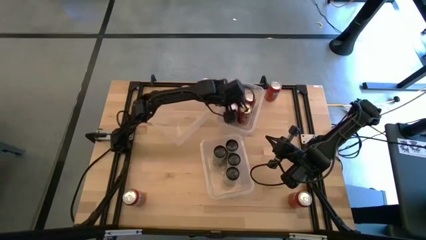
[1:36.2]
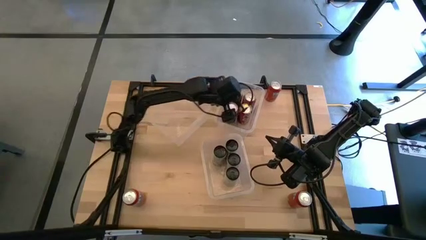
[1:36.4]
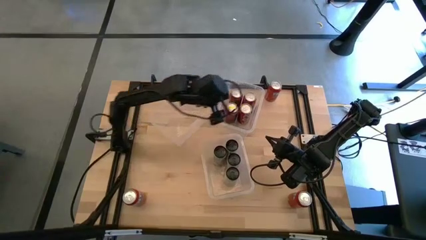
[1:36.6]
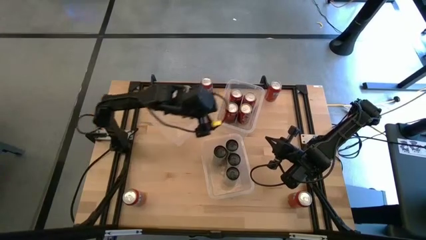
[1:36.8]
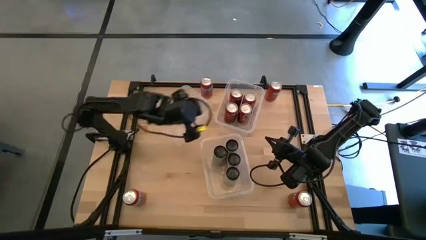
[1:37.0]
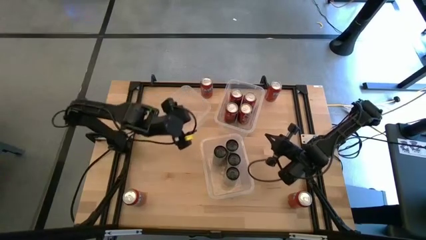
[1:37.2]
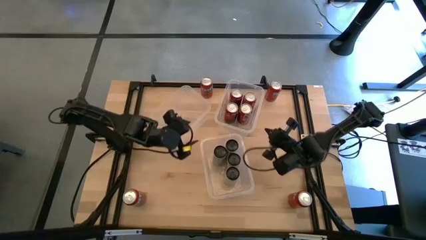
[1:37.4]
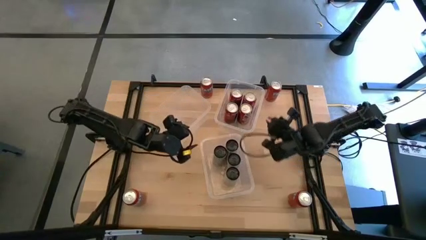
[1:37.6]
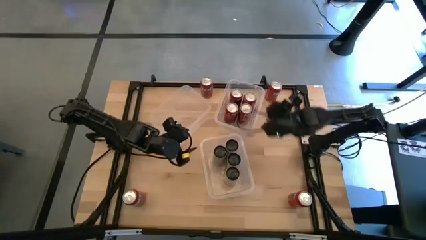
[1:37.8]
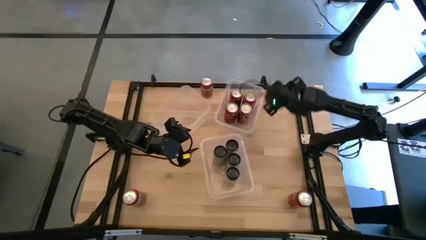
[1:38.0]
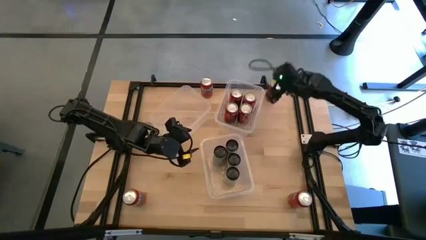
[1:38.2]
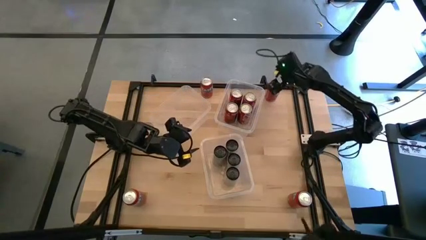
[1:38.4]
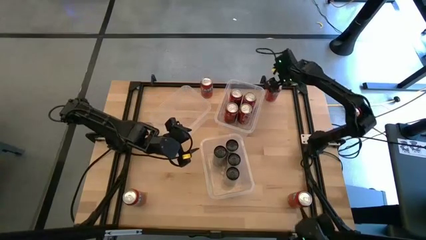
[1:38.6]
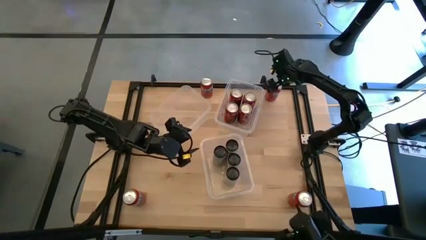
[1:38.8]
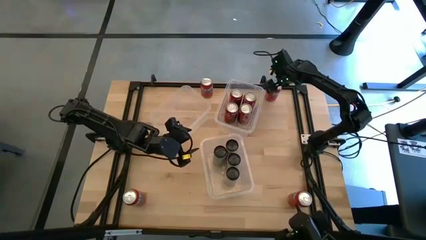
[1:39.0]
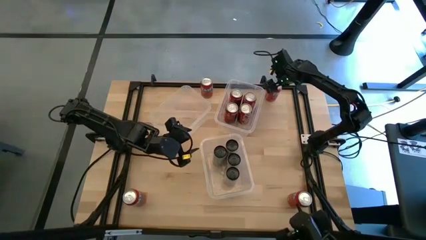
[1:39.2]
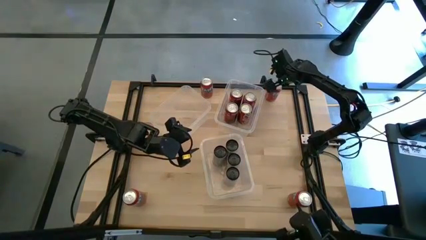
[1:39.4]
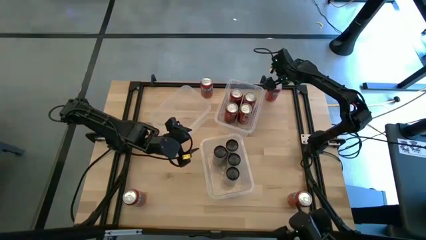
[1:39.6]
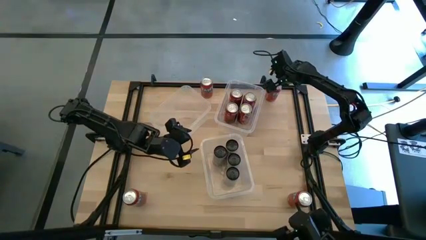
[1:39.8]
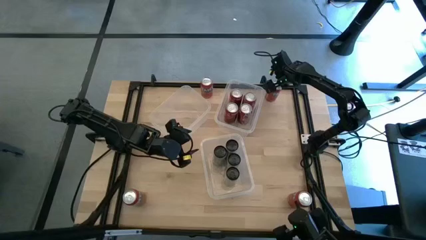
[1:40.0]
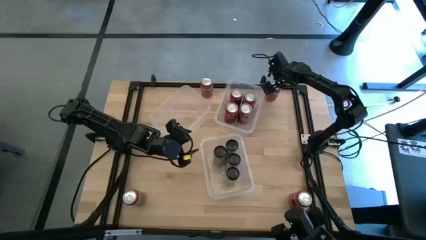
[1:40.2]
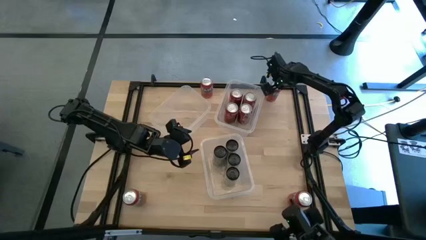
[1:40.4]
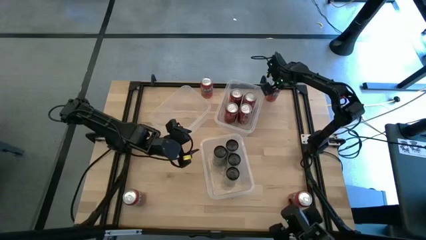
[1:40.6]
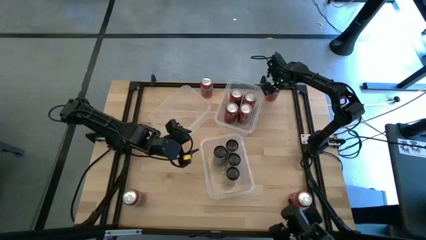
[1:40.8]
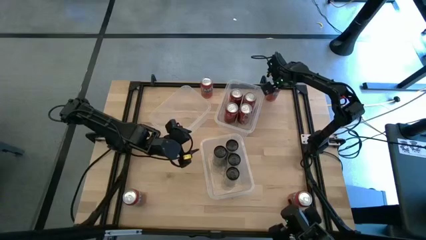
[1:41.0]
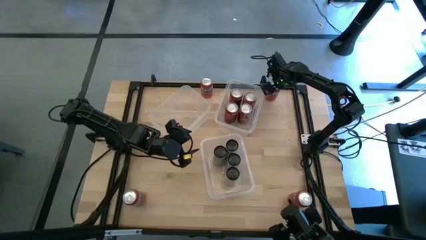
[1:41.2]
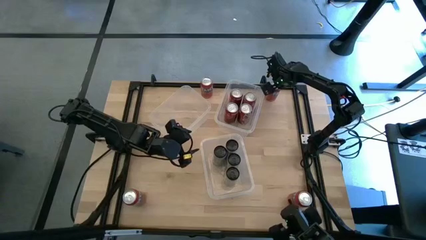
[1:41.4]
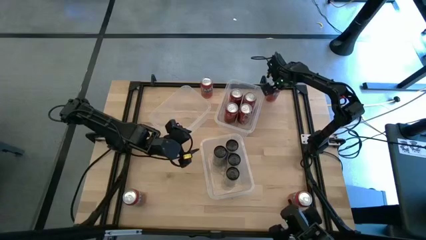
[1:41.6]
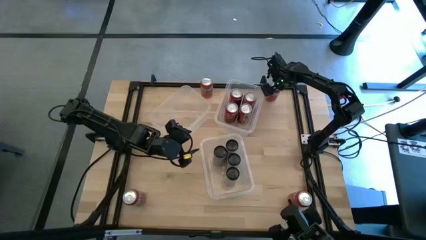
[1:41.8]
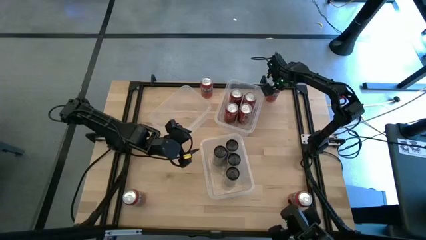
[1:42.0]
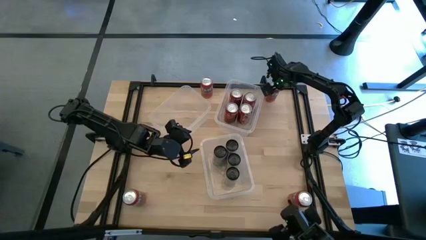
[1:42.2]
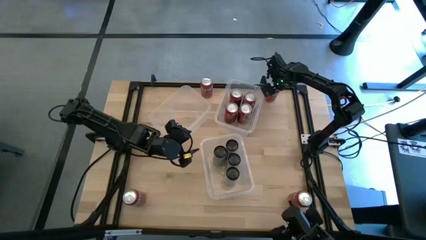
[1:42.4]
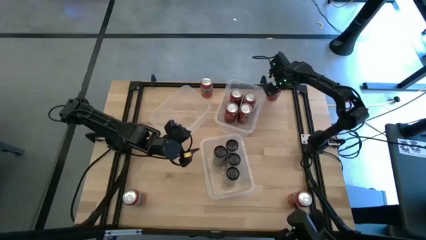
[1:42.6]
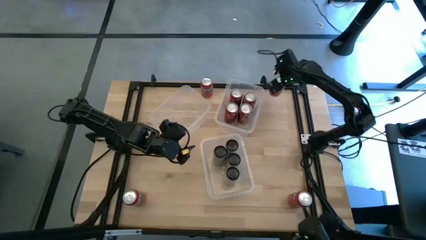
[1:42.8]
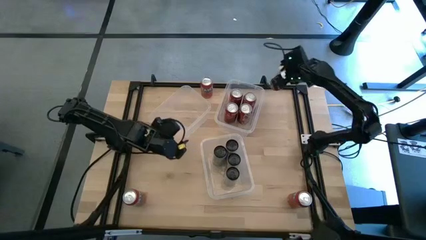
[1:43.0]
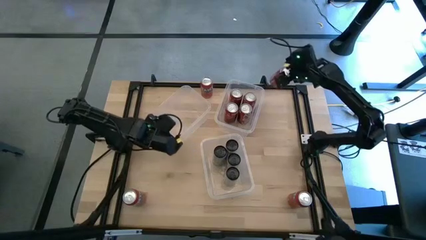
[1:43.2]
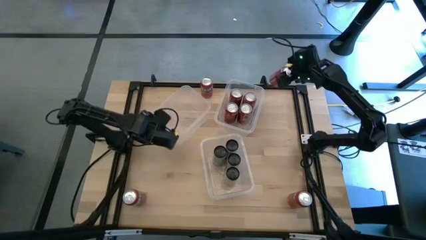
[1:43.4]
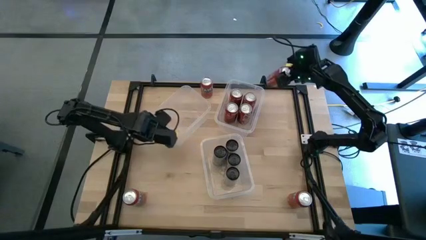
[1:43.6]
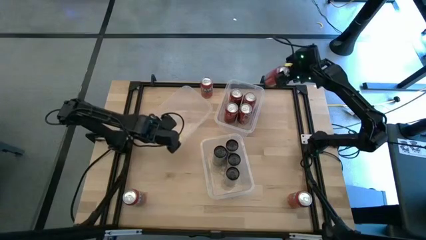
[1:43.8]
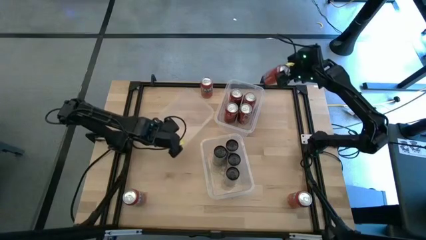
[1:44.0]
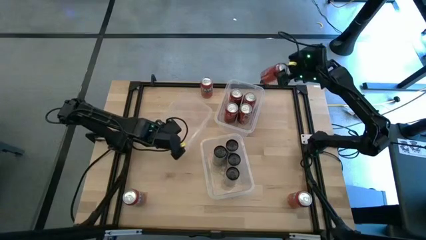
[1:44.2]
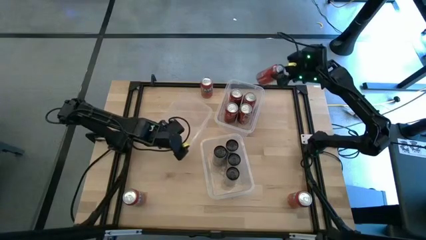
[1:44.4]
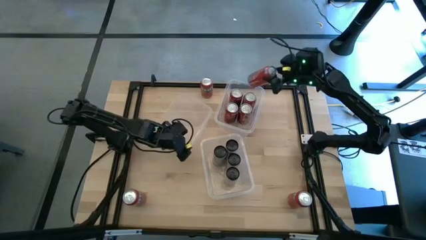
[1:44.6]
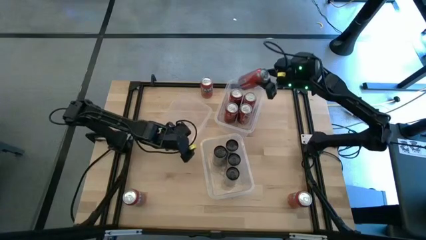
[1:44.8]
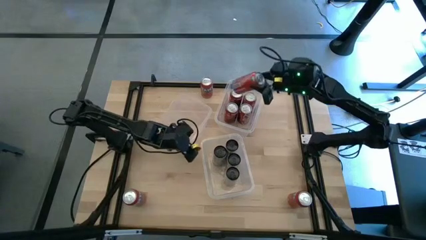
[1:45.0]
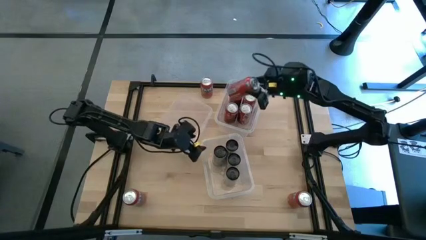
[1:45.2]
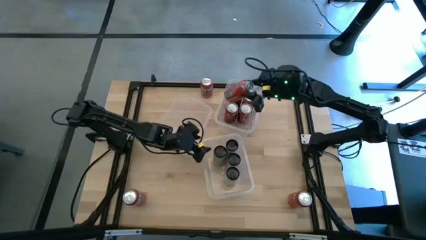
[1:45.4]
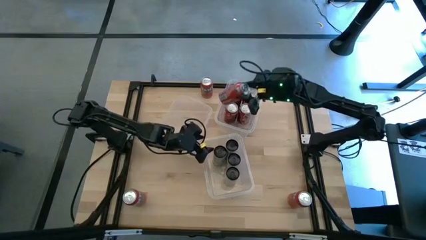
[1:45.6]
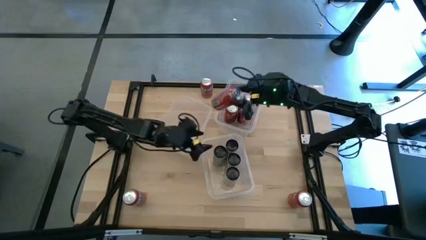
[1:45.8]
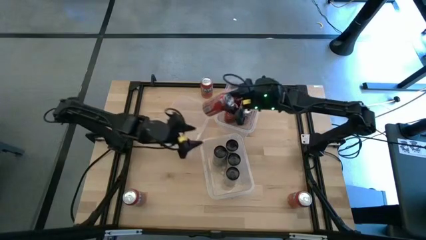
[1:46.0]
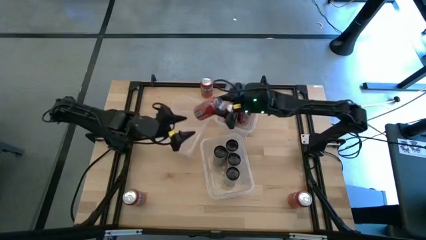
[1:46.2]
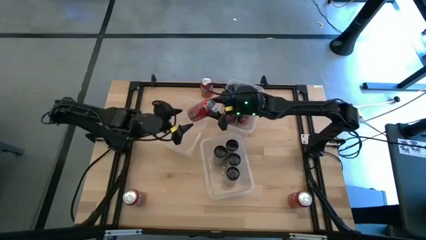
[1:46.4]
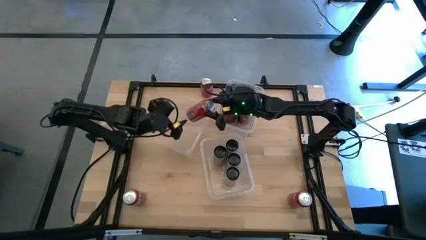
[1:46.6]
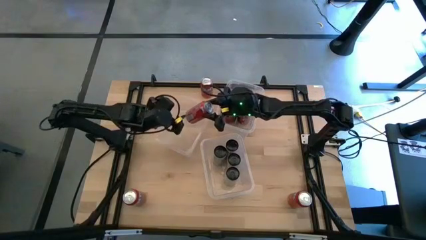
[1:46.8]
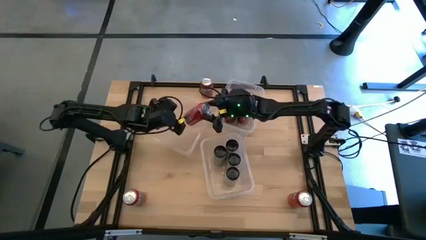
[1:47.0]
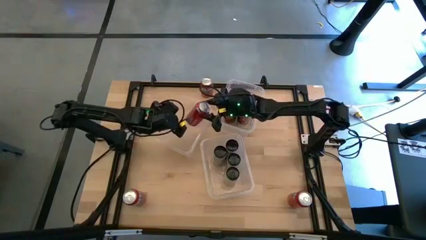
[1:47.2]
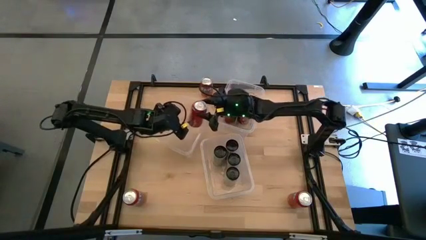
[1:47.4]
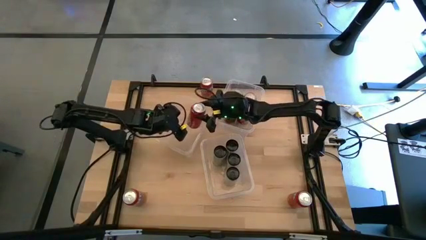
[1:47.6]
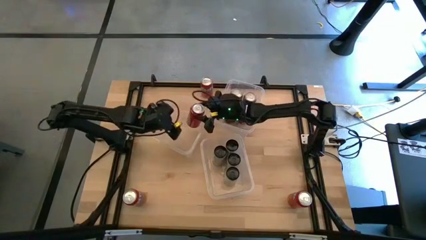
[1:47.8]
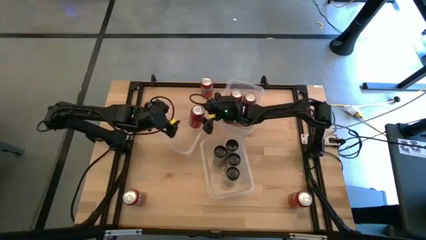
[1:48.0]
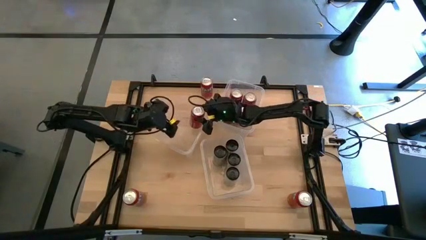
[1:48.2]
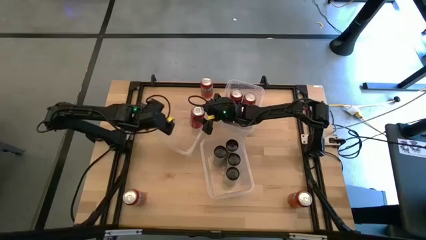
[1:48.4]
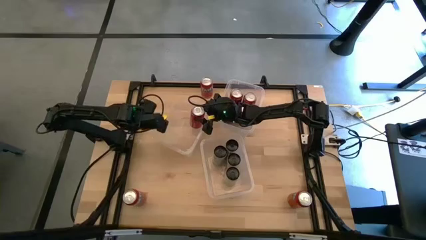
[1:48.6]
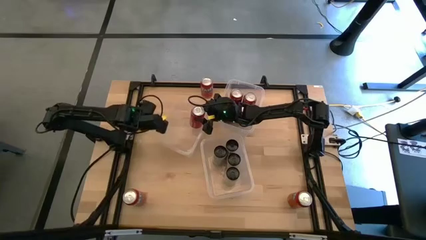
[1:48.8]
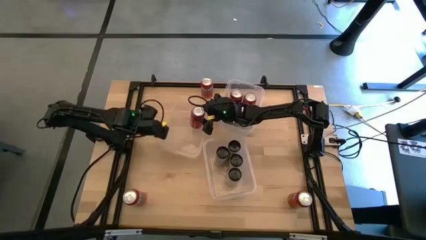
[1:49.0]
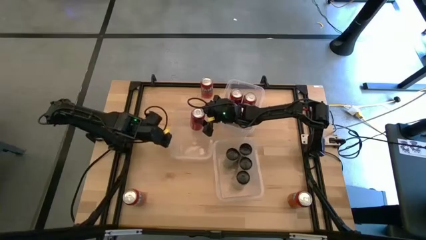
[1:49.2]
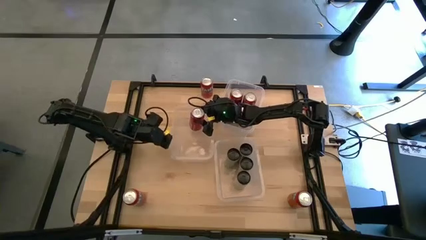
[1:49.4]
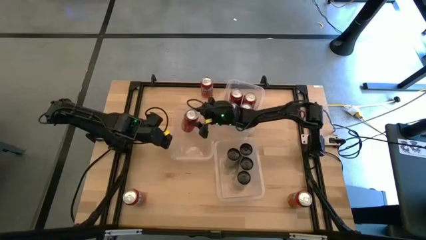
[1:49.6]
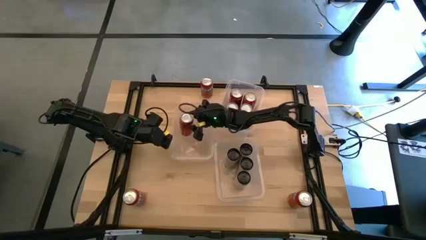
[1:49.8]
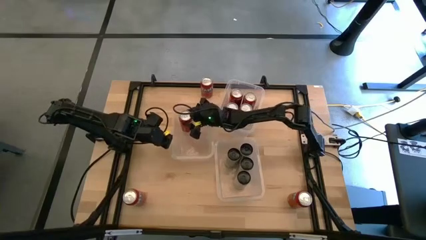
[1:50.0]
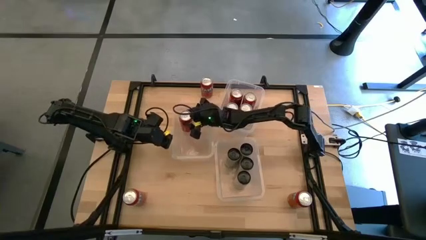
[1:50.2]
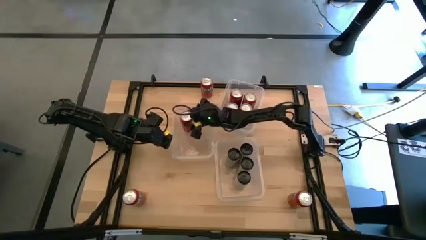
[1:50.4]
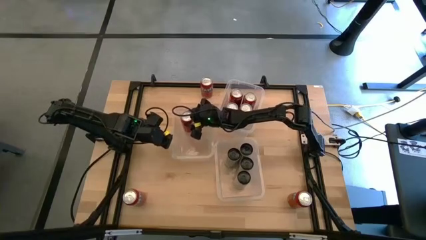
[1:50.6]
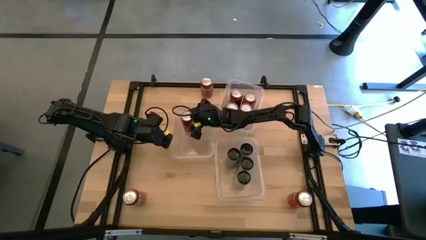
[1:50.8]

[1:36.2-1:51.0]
Task: Sort soda cans
Put the red soda can into the middle transparent bin

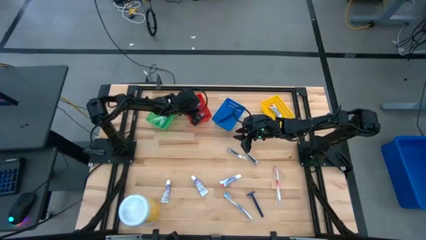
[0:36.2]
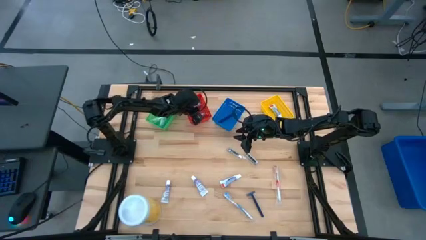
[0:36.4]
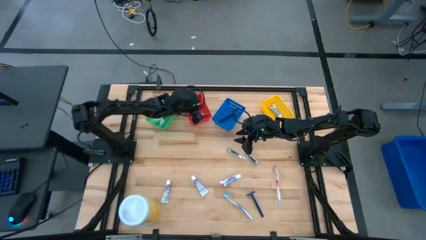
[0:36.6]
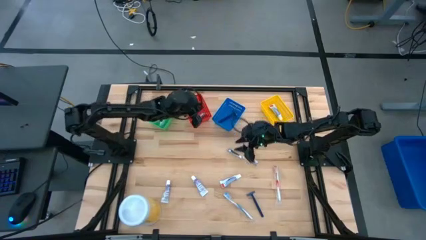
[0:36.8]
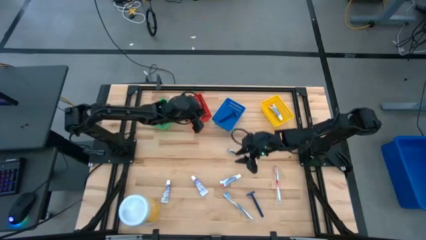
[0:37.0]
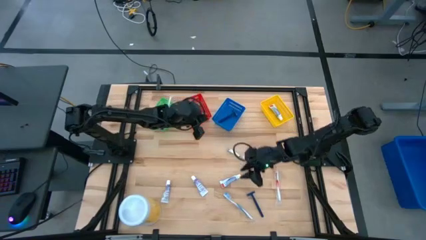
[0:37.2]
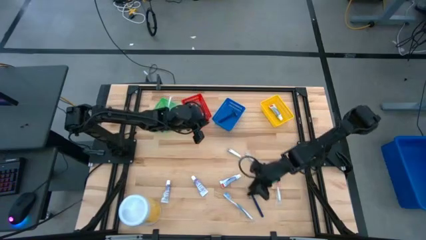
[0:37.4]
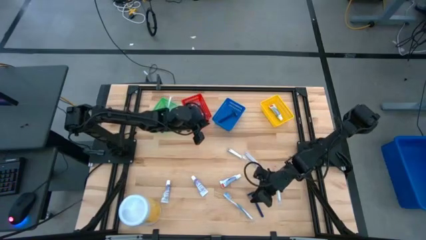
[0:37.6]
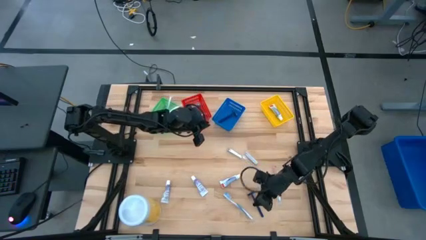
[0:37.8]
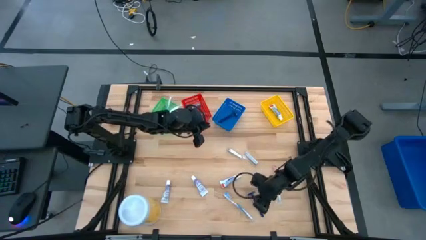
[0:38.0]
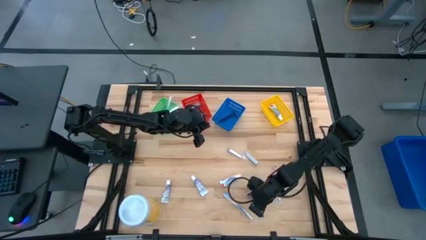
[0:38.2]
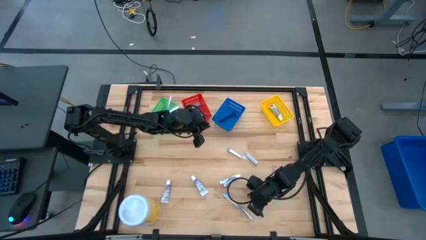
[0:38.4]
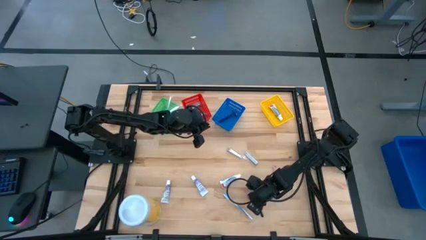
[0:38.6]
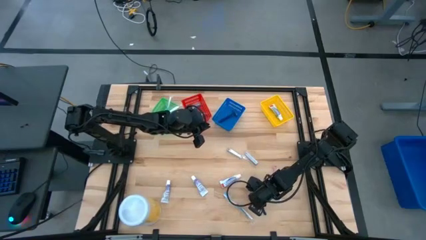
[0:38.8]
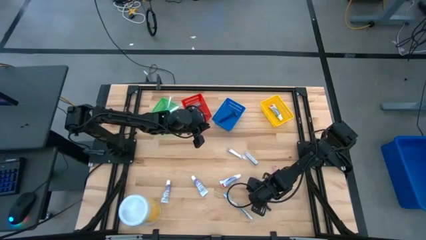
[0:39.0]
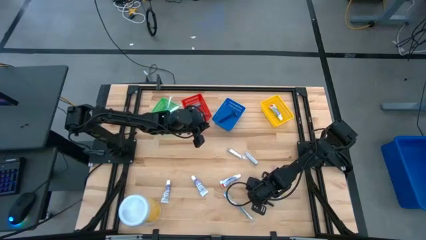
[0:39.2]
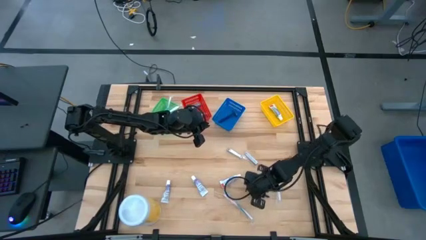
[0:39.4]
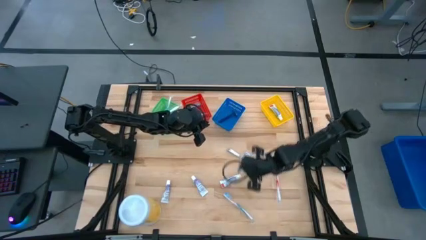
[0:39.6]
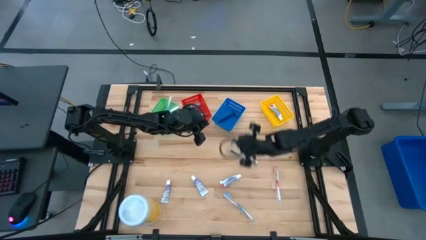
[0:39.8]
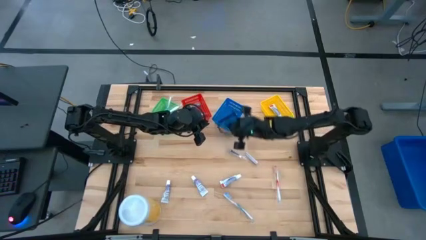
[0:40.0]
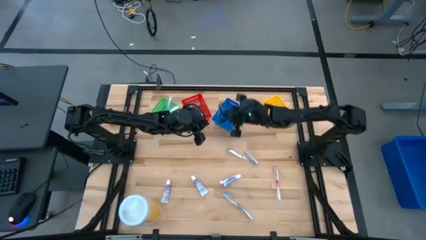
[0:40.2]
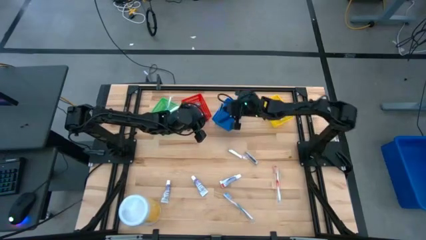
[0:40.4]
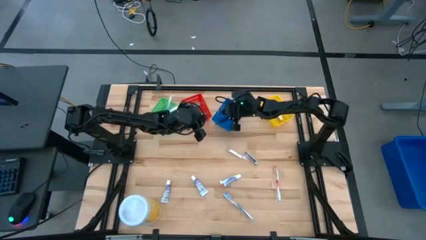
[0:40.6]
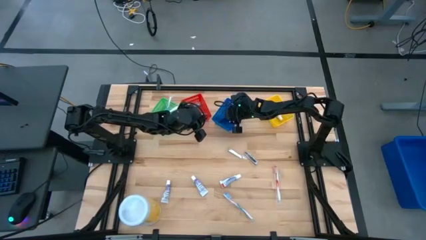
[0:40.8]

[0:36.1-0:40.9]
Task: Pick & Place Travel size toiletries
Put the razor into the blue basket
